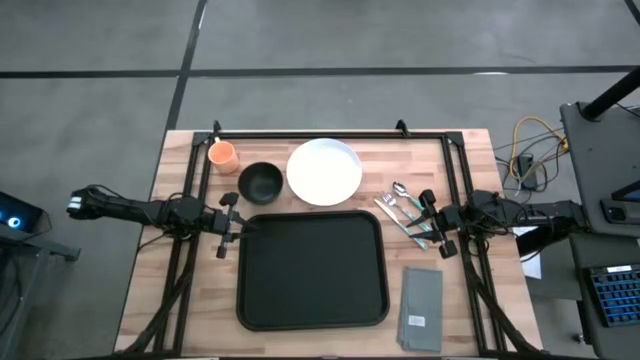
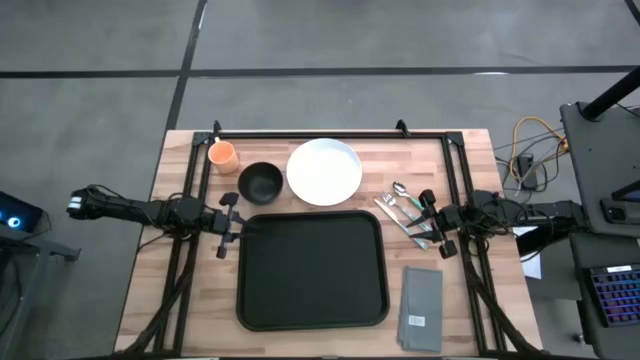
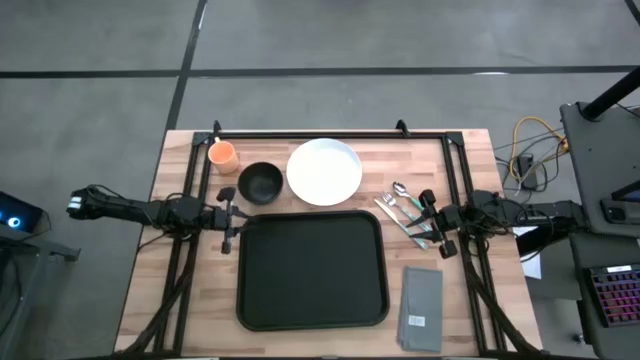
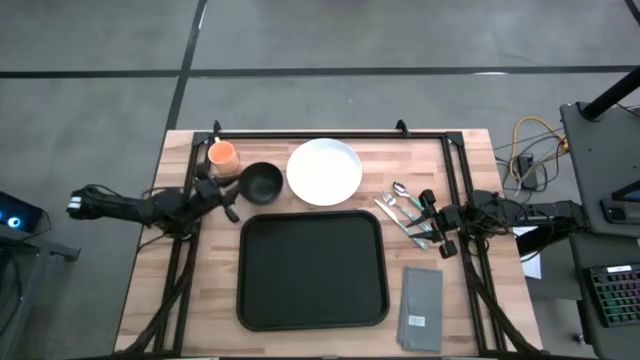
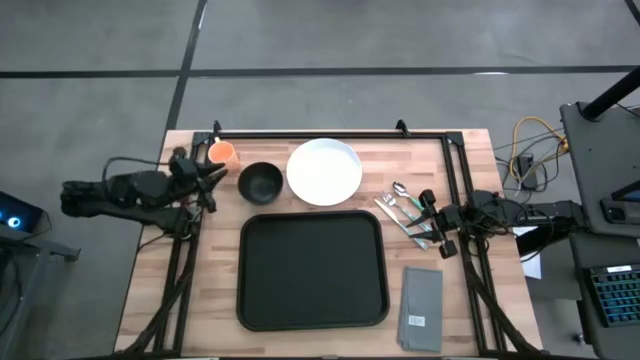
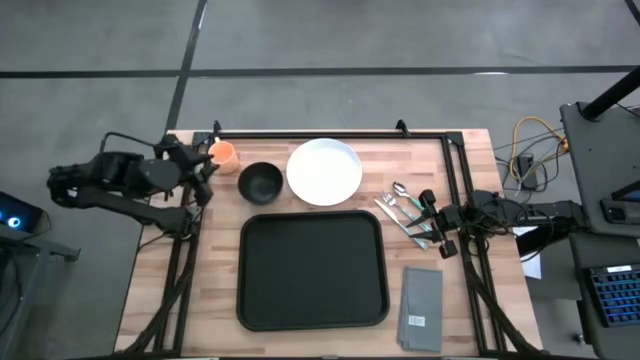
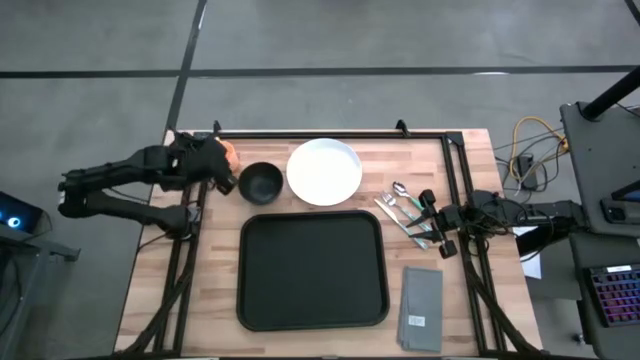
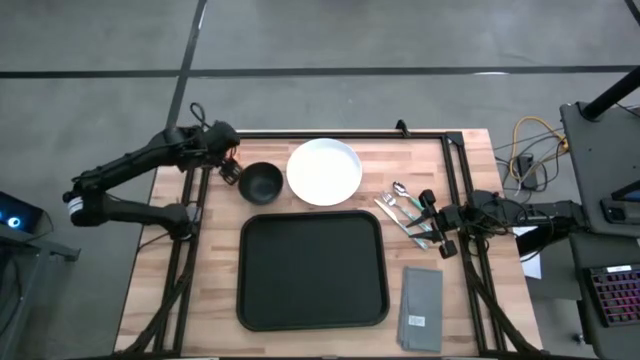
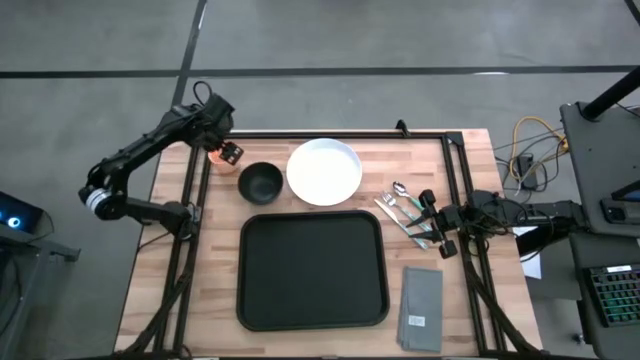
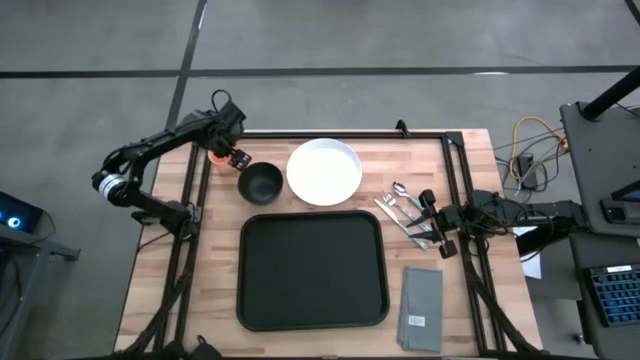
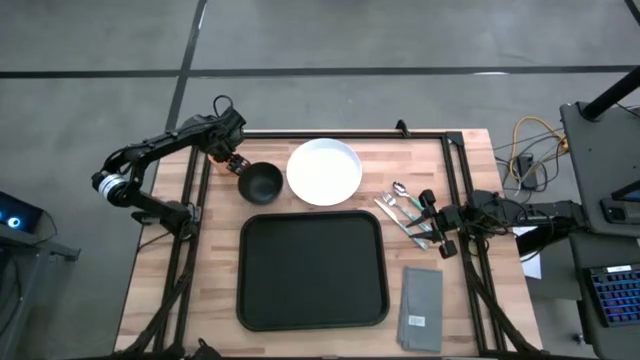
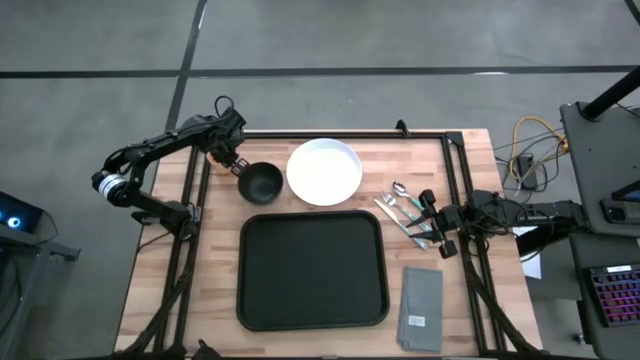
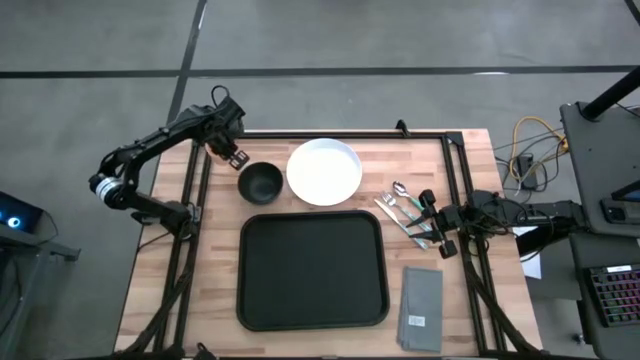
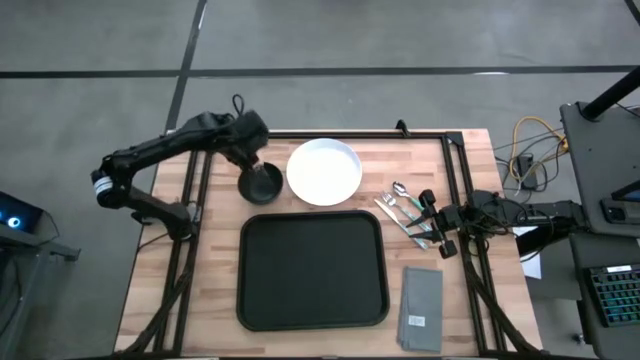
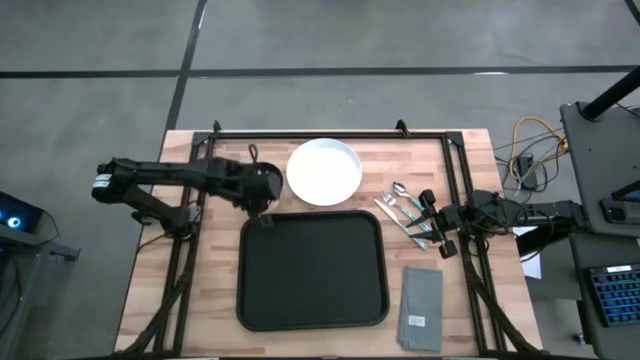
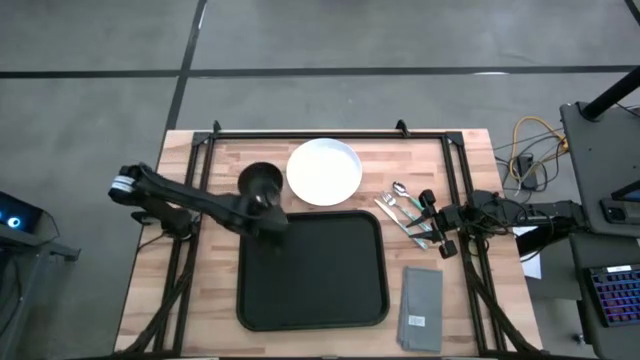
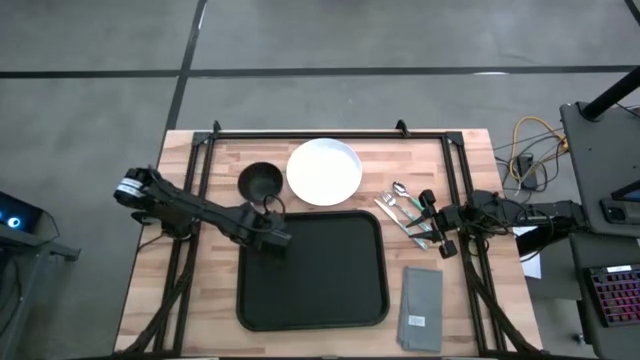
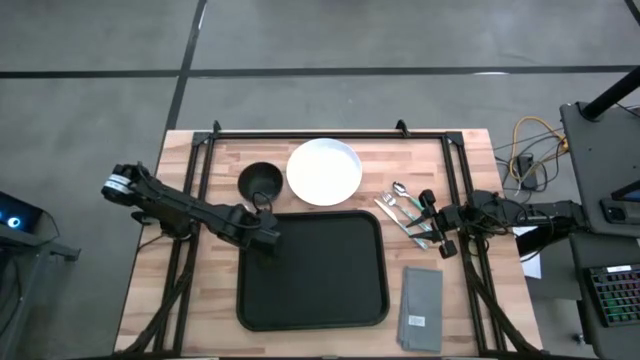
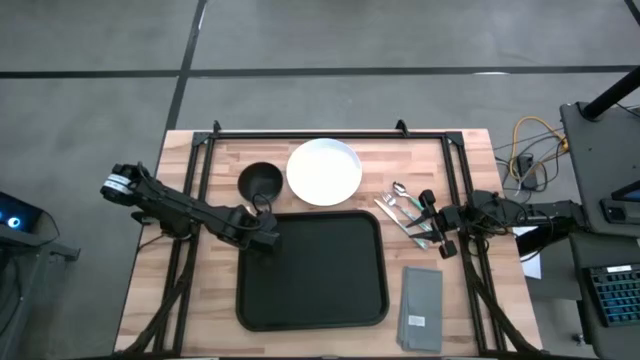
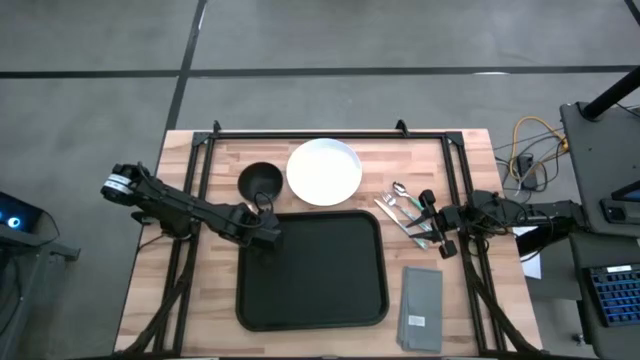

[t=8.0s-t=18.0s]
Task: Set up tray
Put the orange mug into the black table tray

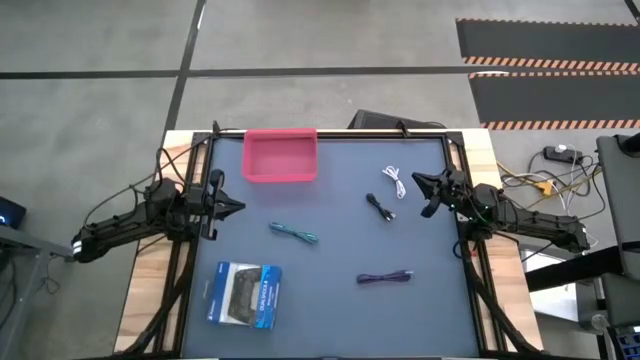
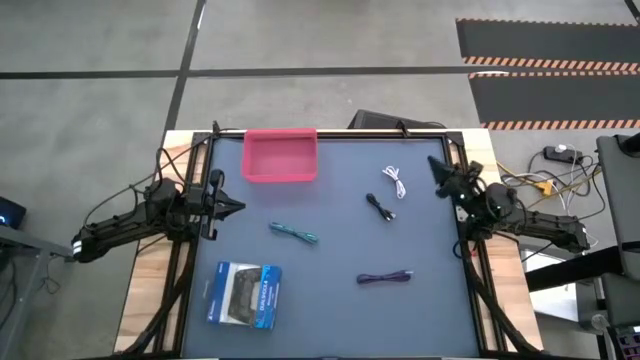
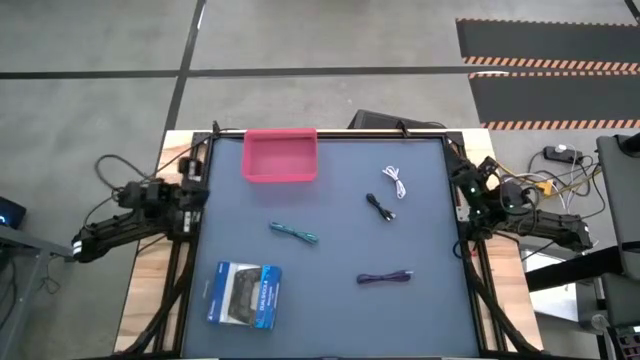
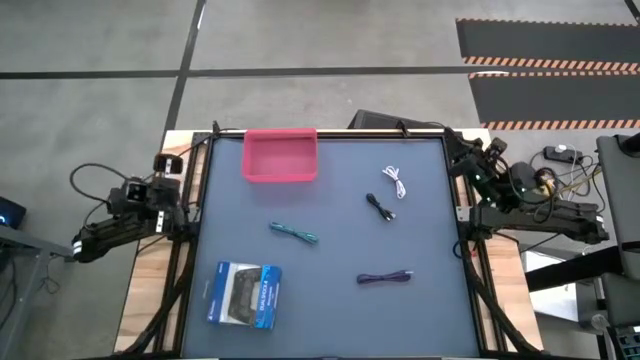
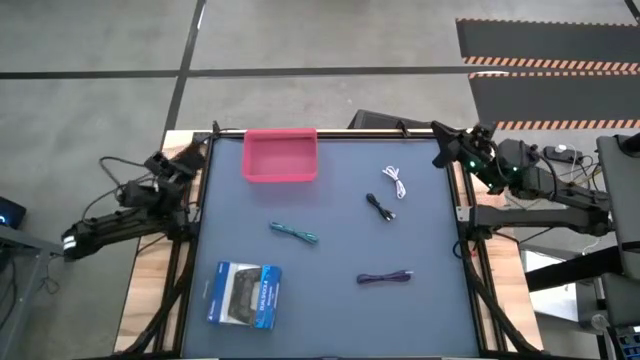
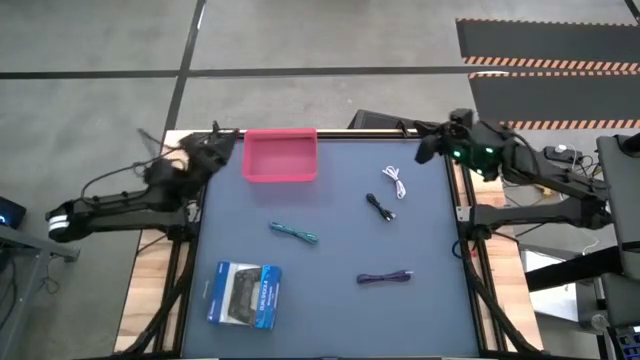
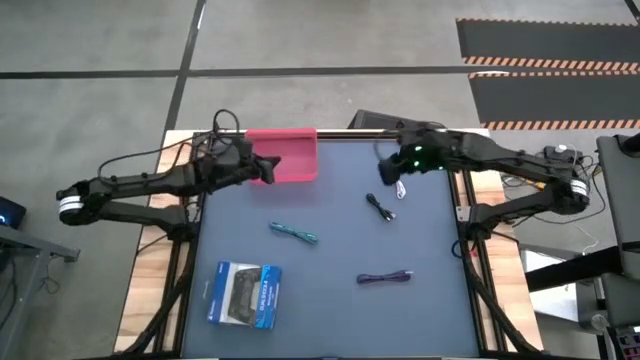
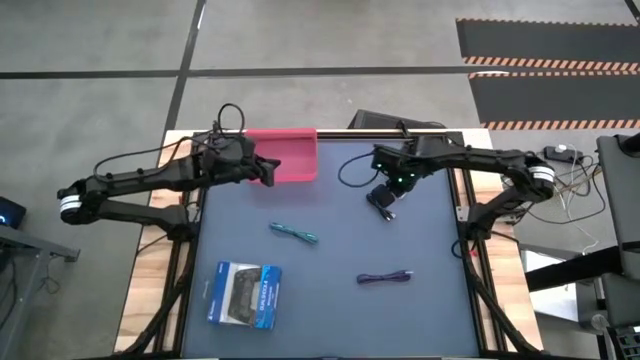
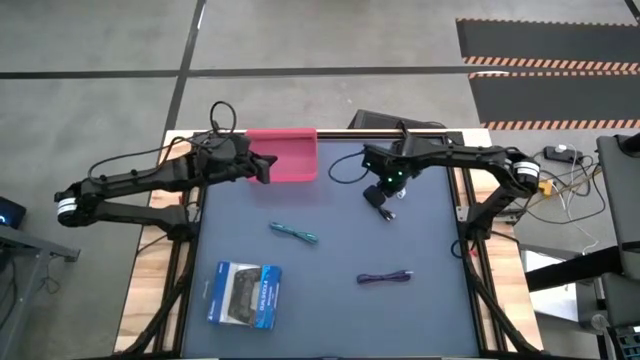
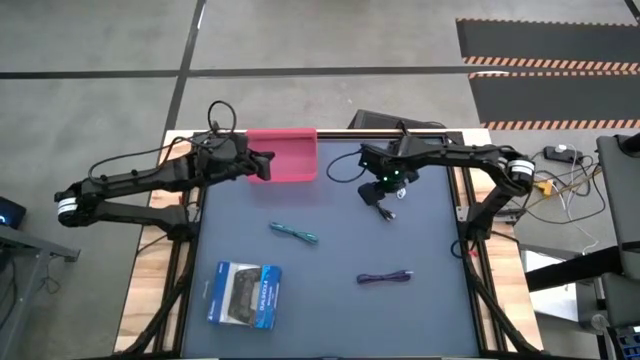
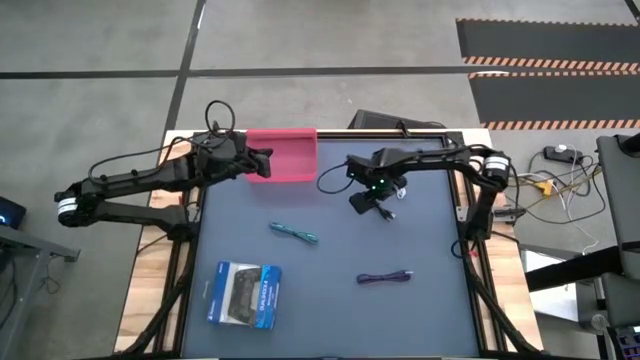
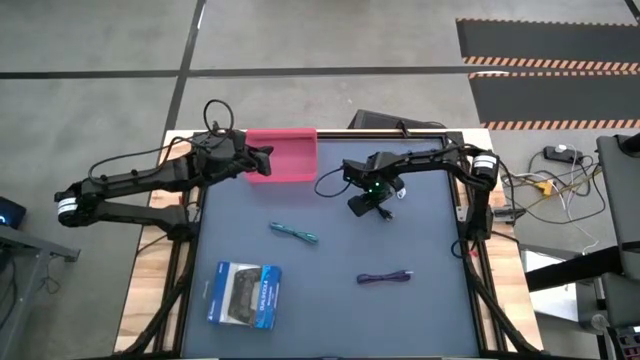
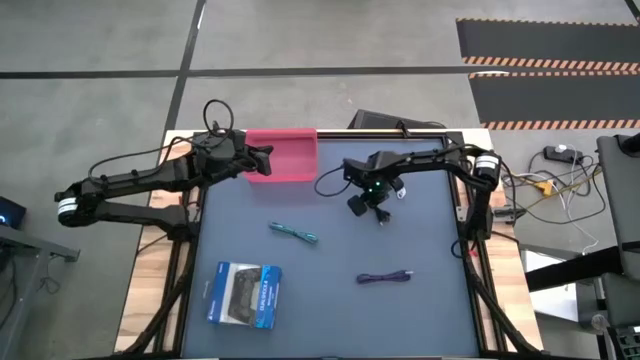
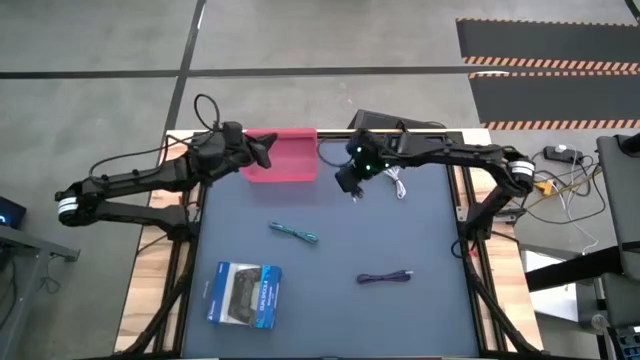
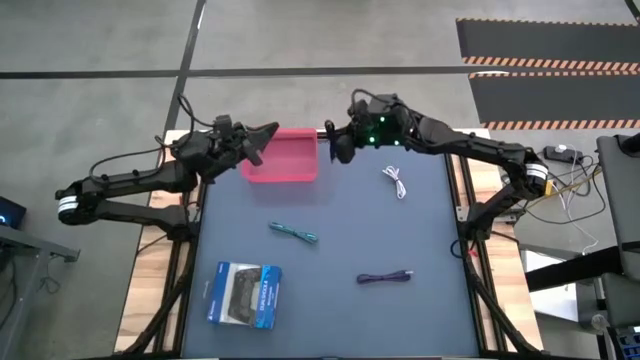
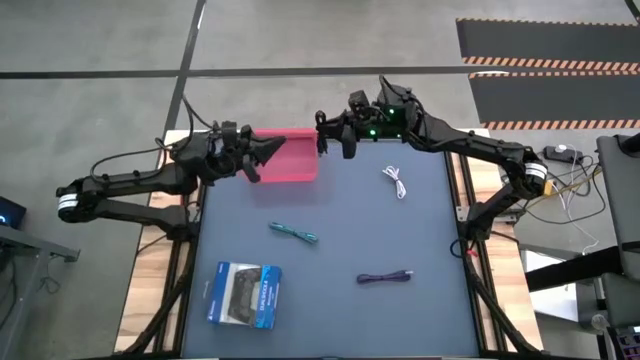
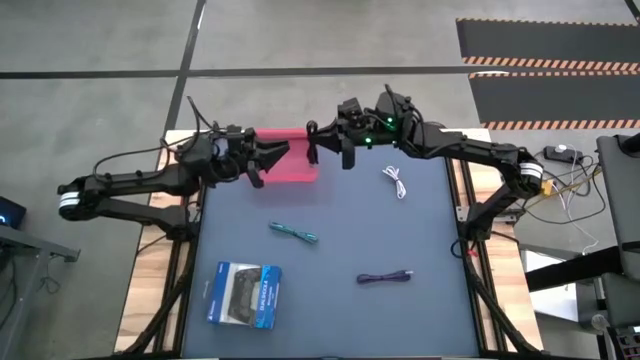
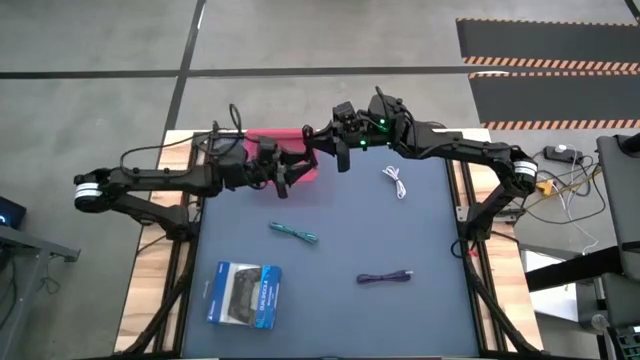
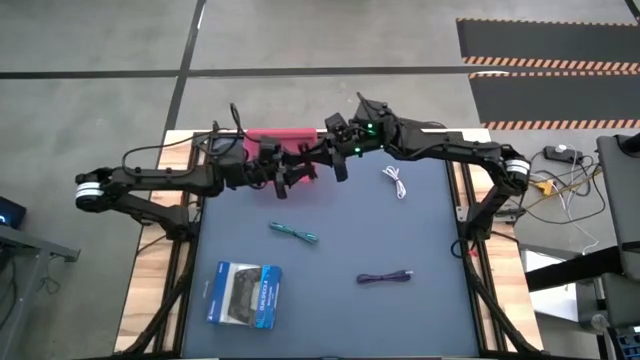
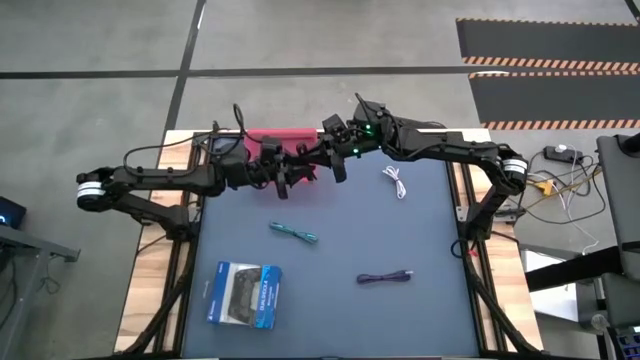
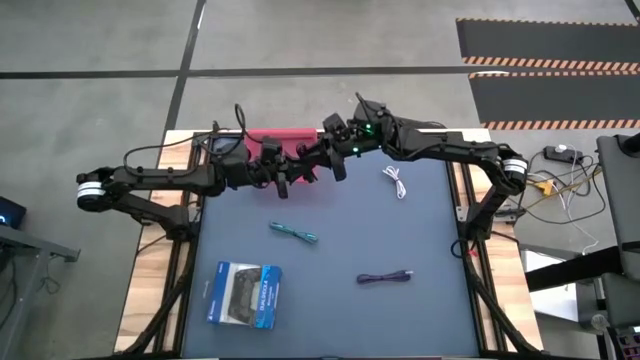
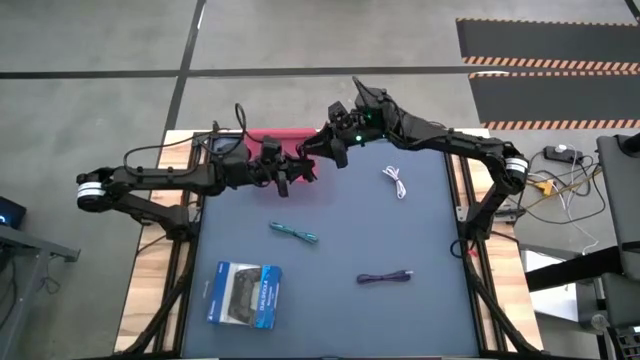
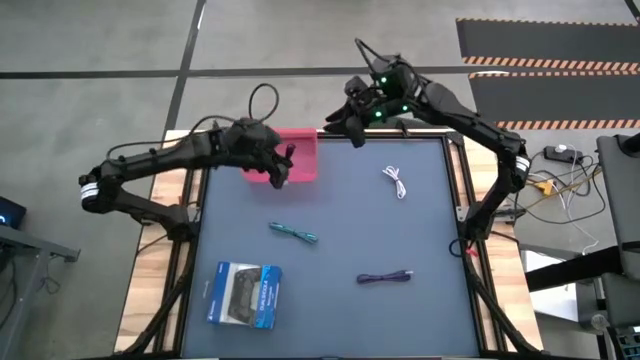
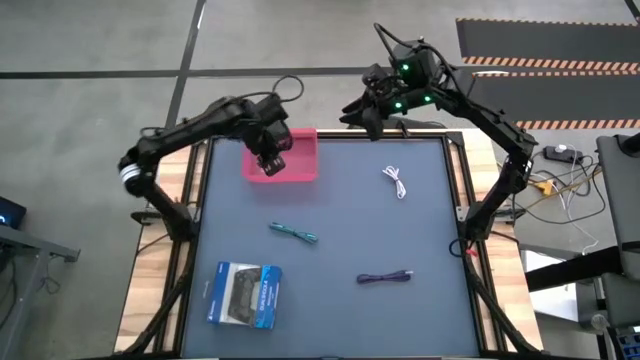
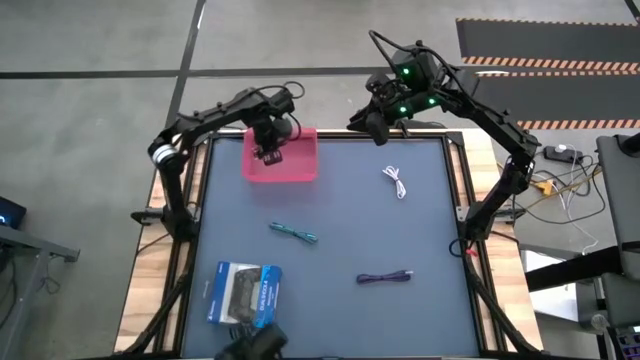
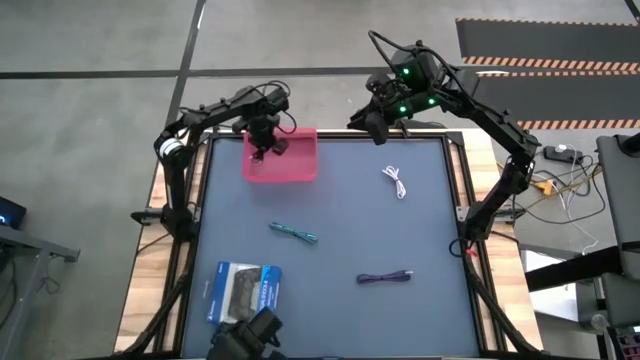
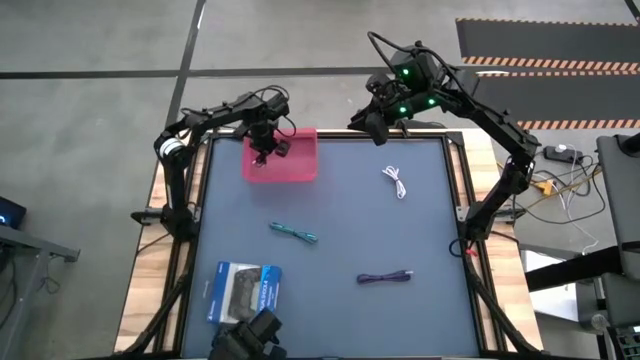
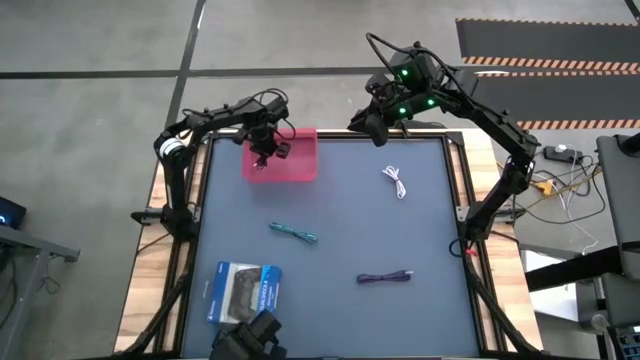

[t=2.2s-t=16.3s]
Task: Pick and place USB-C Cables
Put the black charger cable into the pink bin
